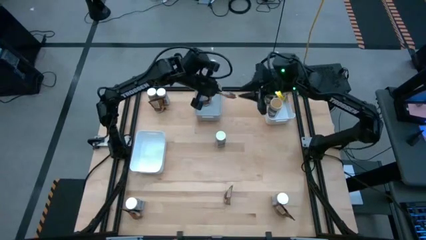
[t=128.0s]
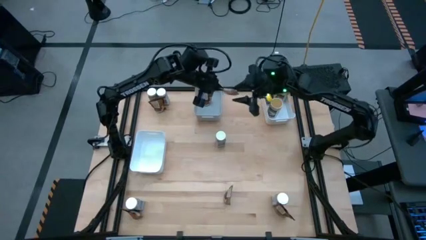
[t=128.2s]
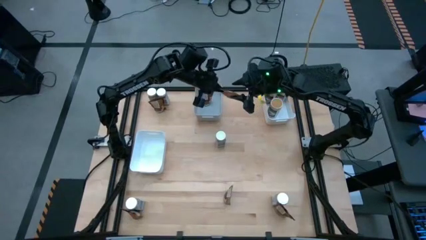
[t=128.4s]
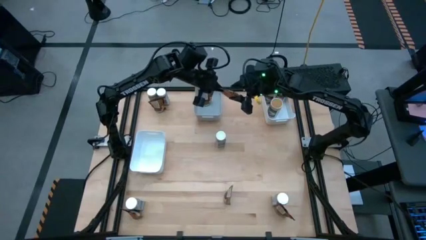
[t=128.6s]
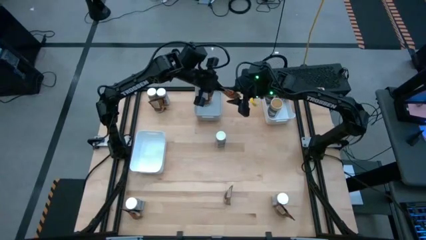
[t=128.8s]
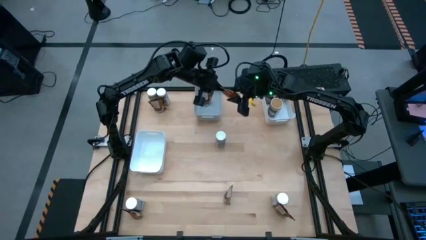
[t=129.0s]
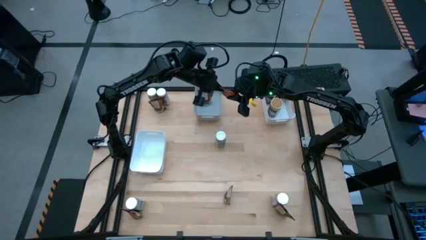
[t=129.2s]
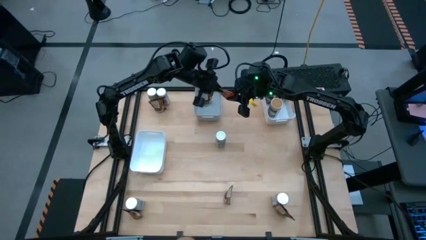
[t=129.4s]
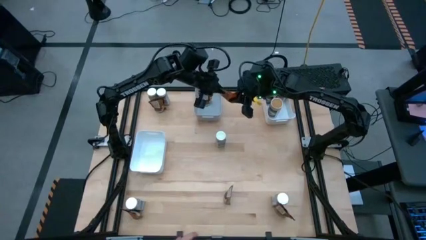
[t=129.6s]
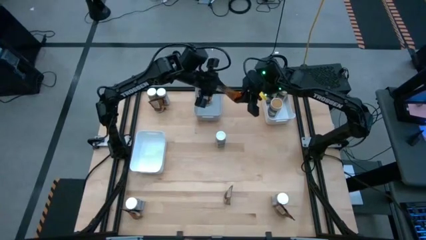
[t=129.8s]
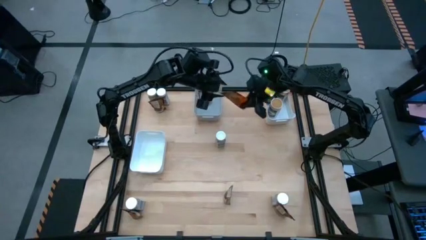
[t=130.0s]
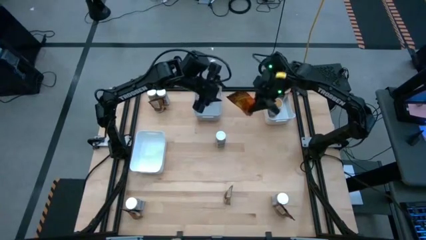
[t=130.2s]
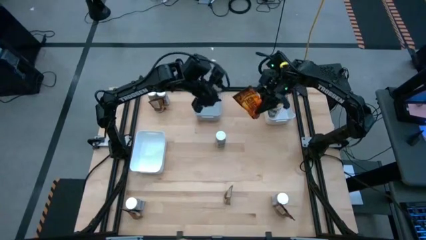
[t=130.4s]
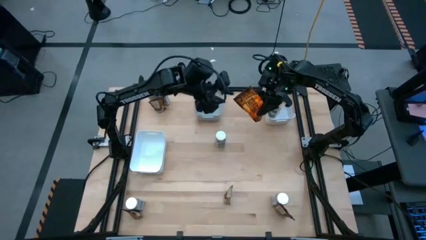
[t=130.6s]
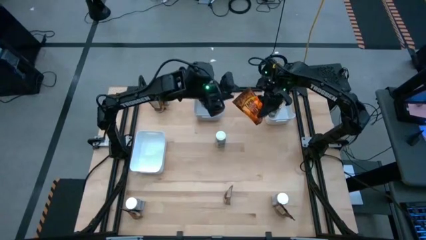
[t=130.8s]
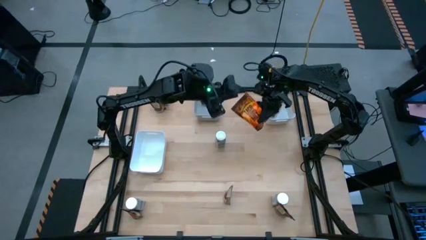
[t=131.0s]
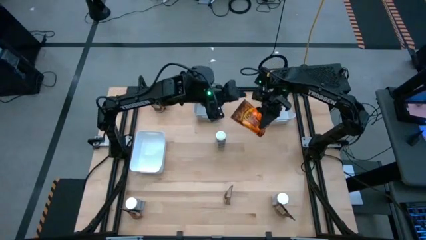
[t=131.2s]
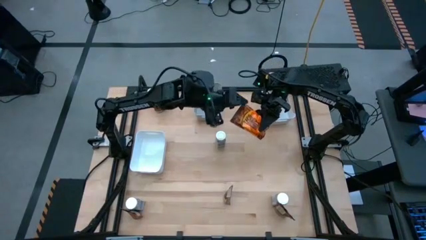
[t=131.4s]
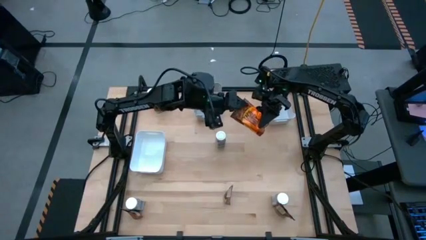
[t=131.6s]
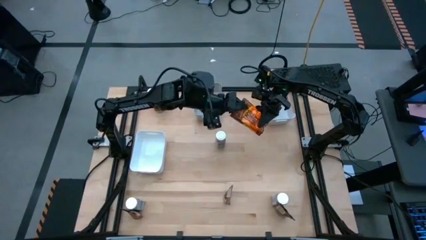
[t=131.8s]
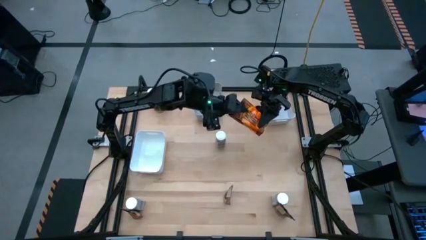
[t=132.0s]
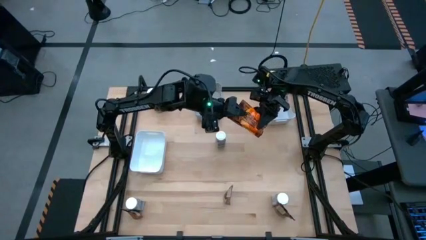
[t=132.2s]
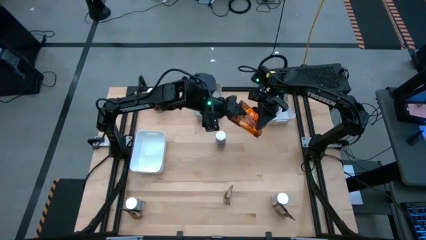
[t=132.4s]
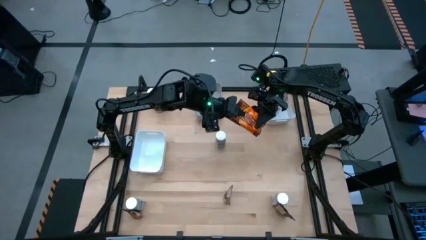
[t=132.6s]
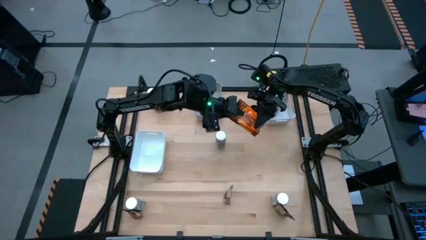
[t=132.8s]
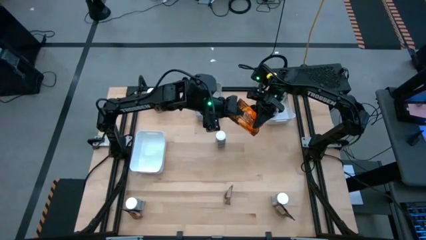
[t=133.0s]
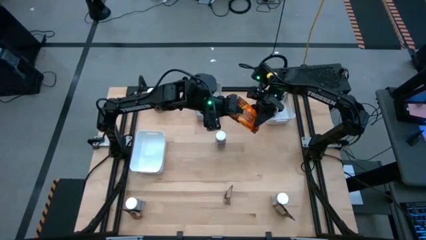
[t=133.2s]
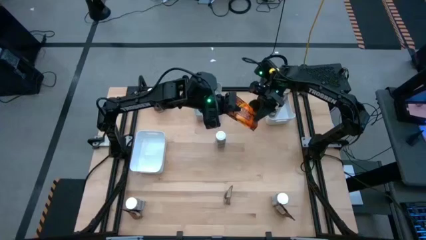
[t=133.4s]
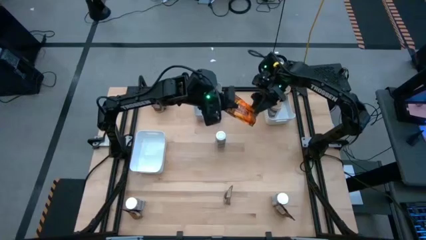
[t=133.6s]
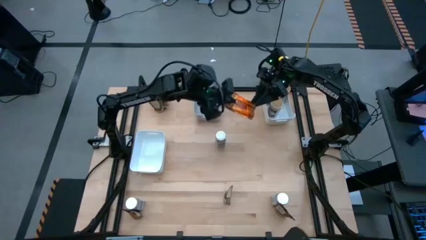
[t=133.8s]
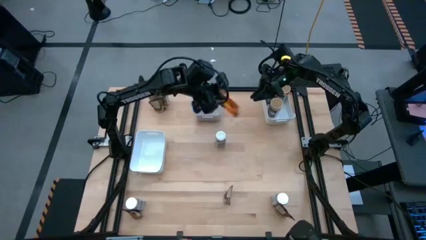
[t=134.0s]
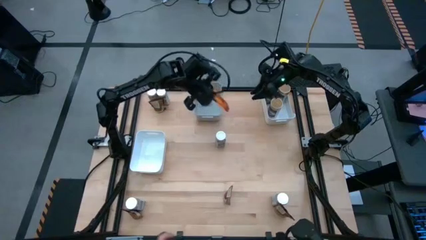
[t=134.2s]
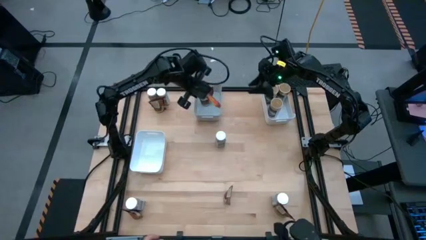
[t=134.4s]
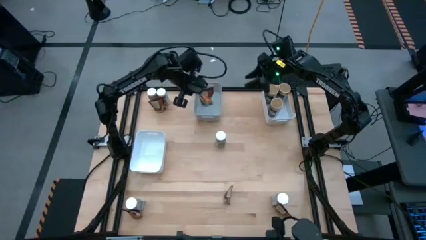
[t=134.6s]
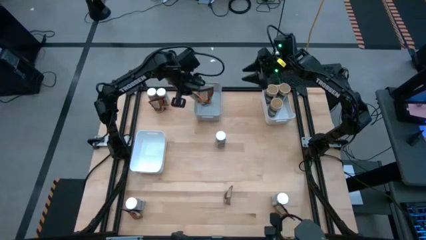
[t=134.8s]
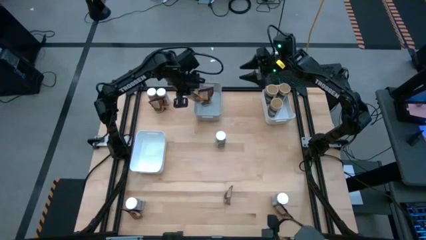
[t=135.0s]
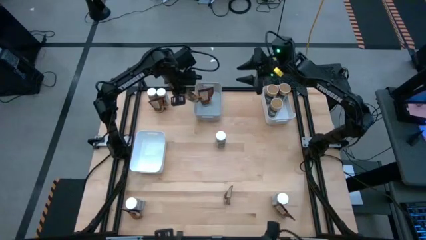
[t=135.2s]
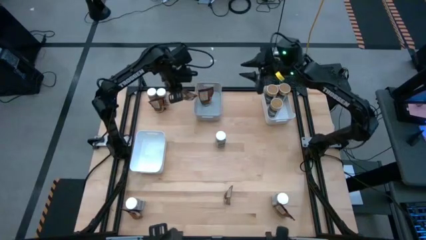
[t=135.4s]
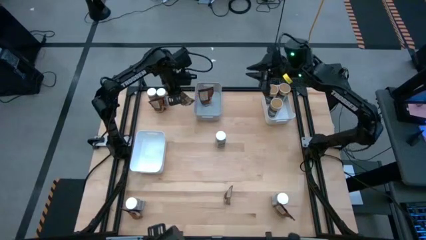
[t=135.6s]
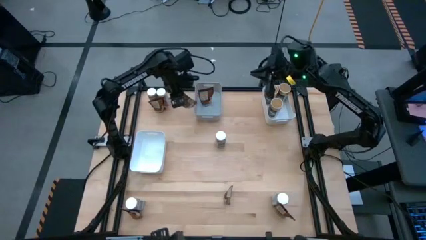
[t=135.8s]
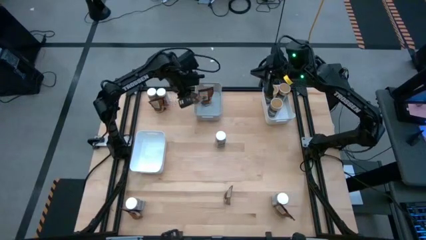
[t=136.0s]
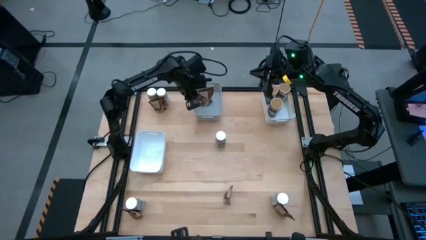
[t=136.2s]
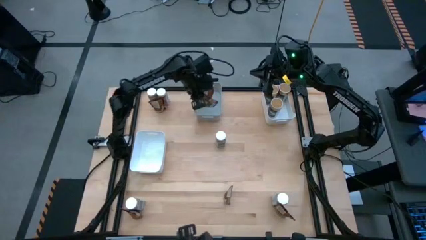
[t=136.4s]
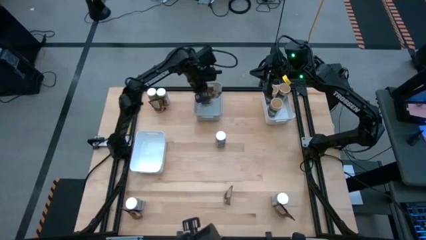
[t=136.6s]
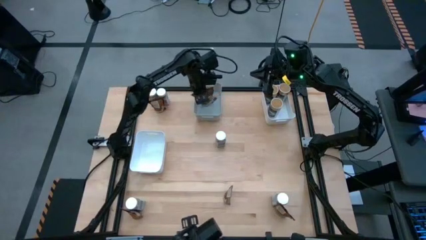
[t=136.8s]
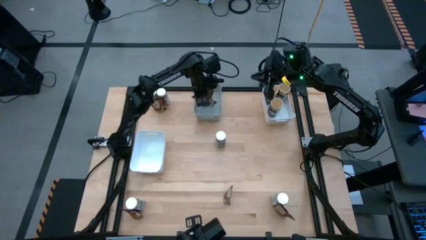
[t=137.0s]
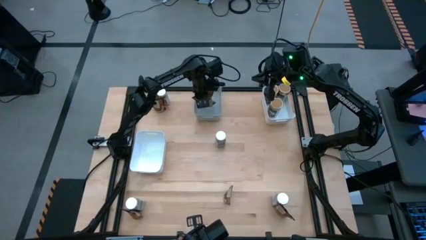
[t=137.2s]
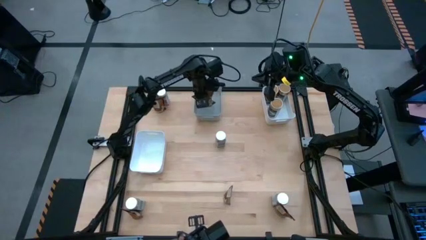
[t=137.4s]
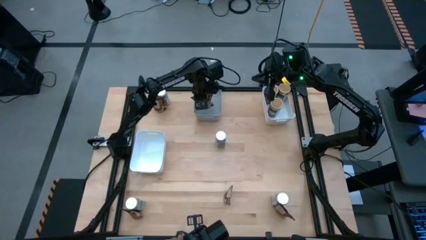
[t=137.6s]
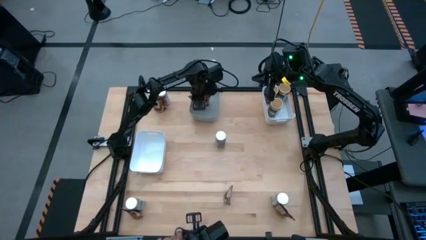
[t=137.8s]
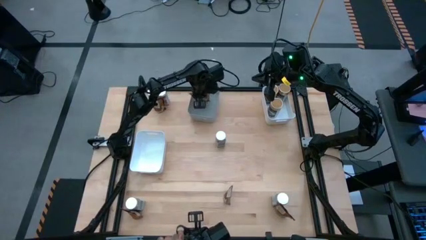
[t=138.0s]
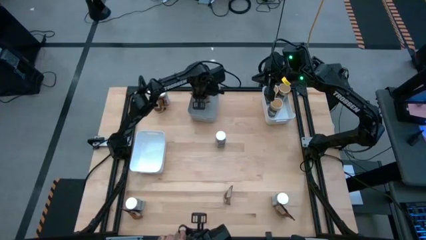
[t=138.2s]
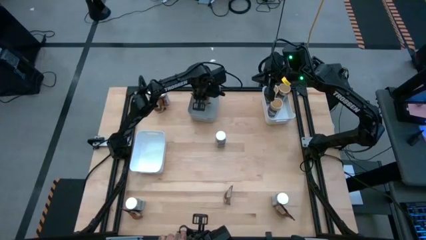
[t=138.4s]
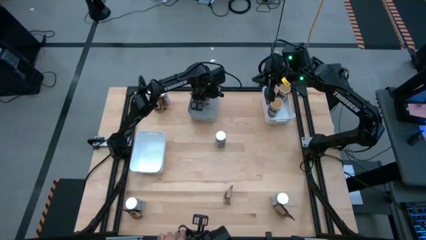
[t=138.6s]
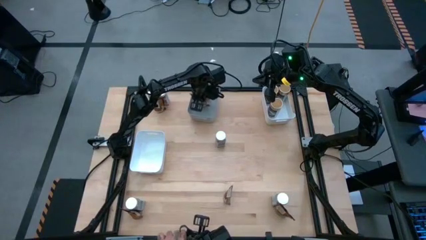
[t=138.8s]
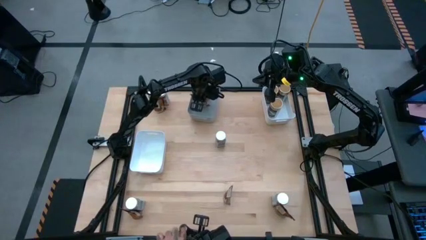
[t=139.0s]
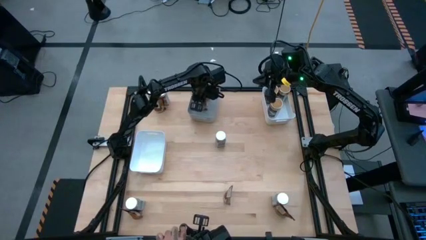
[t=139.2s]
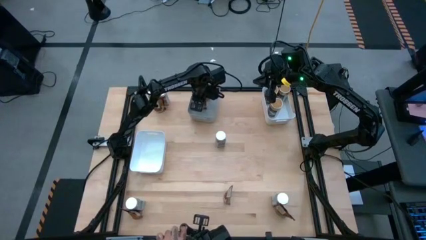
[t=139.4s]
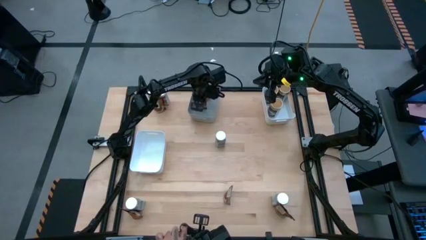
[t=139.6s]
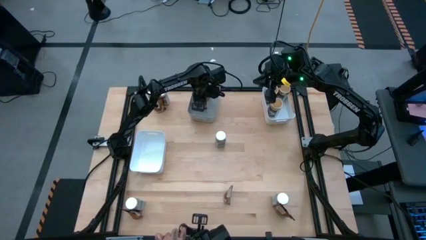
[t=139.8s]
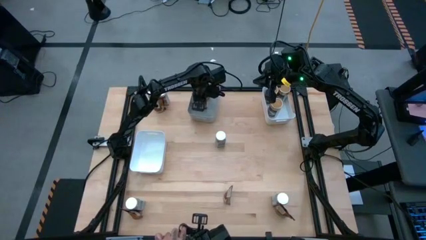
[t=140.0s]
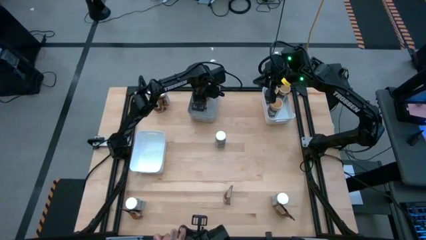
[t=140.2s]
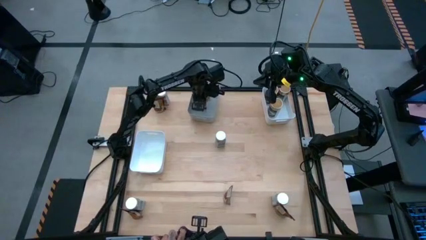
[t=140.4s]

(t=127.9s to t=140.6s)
Task: Sort spices by type
Adjust the orange spice pack
